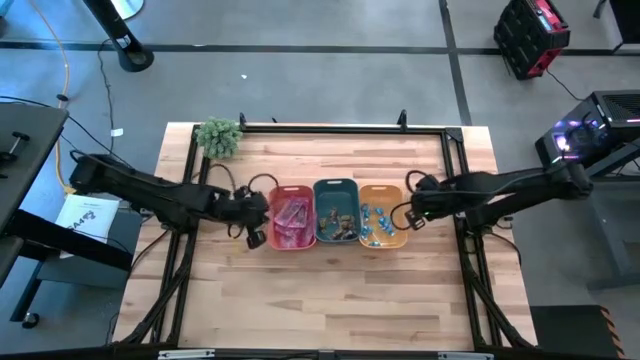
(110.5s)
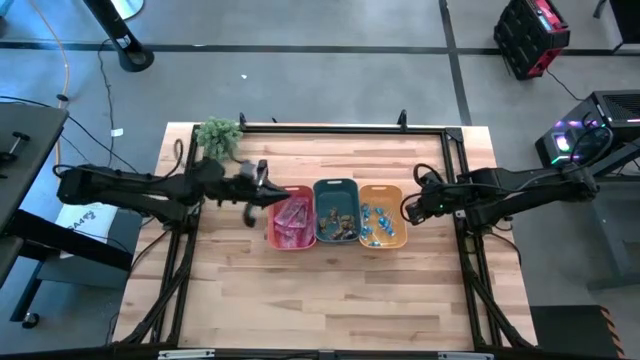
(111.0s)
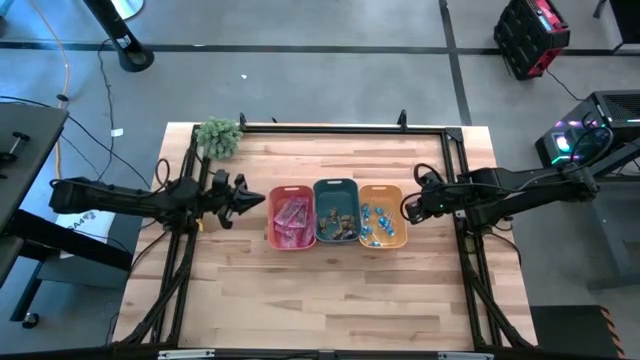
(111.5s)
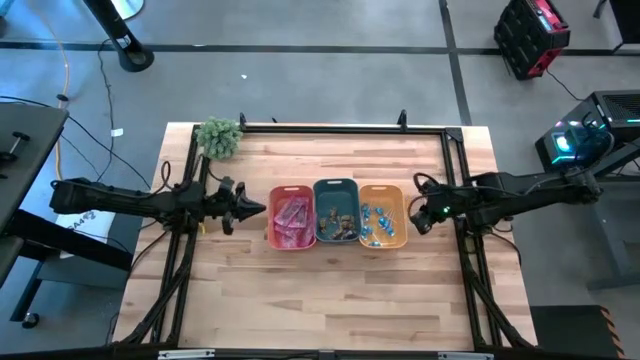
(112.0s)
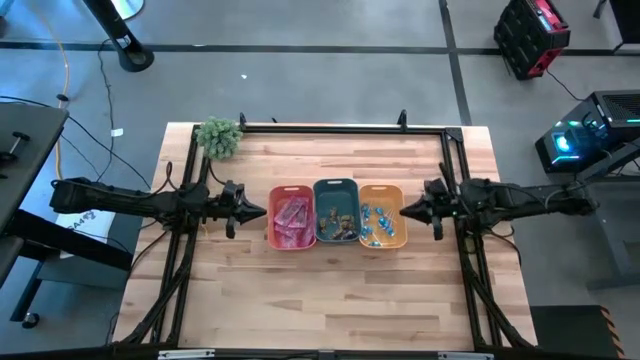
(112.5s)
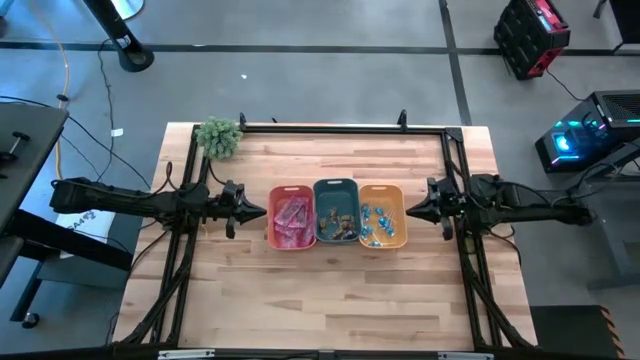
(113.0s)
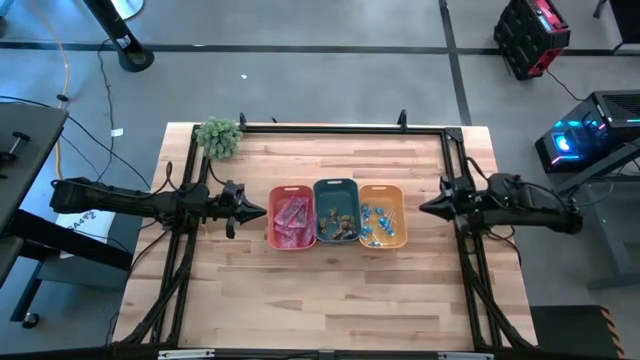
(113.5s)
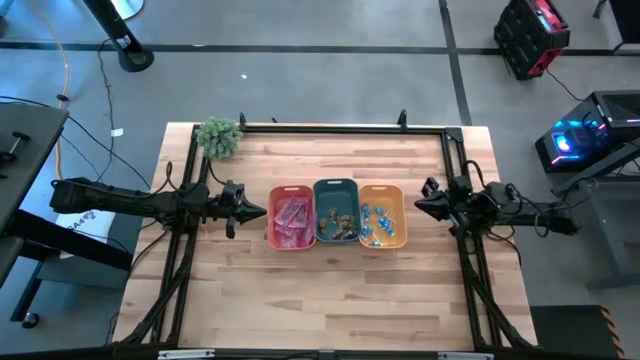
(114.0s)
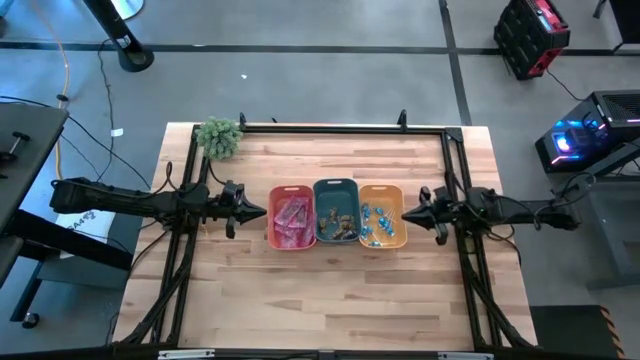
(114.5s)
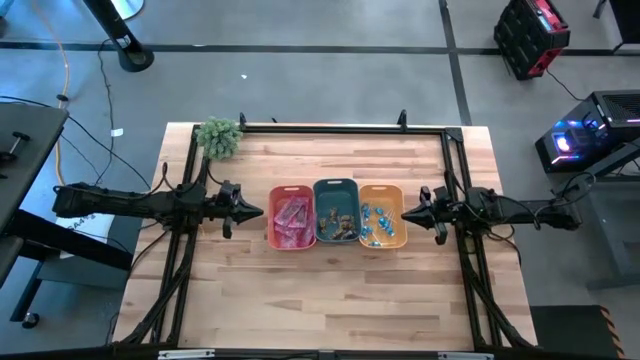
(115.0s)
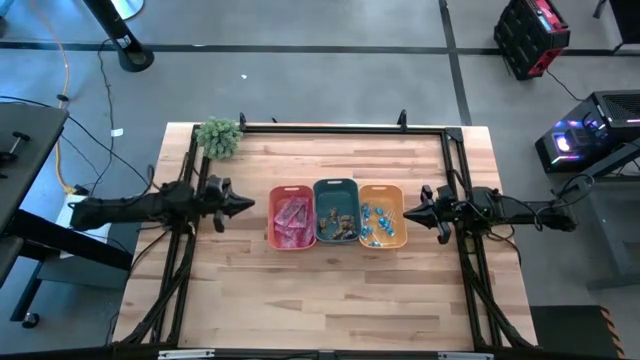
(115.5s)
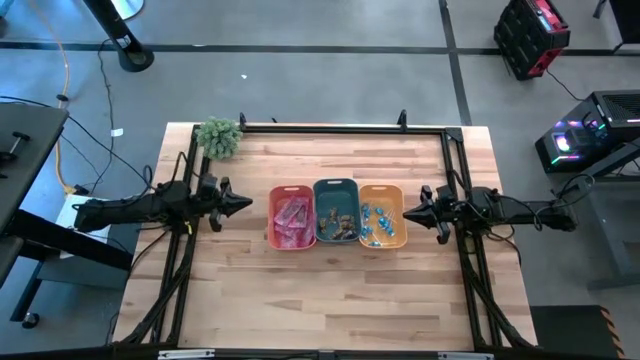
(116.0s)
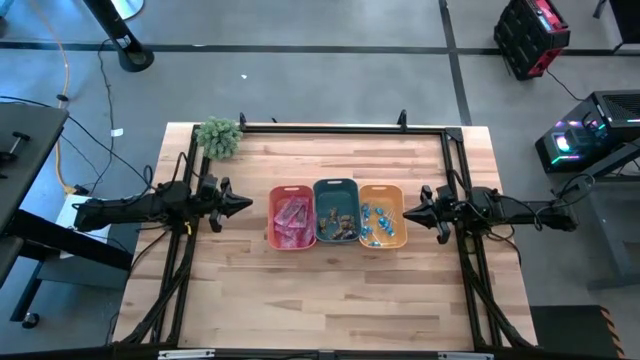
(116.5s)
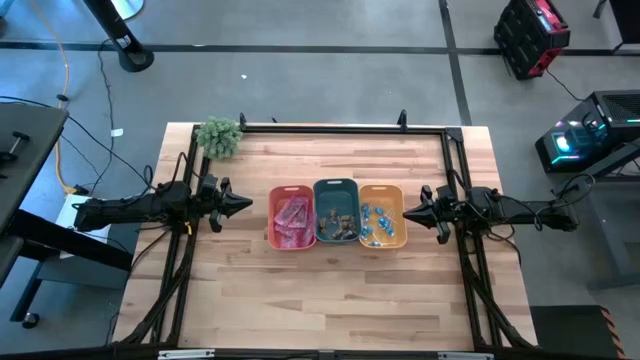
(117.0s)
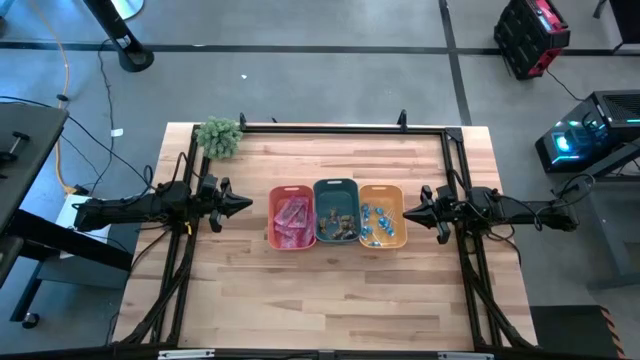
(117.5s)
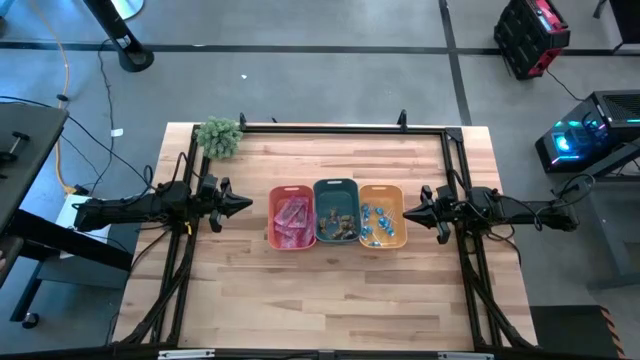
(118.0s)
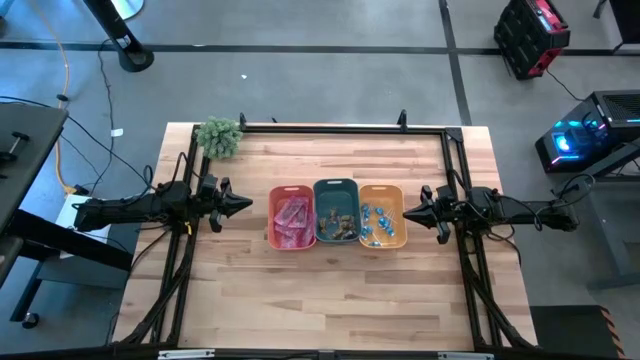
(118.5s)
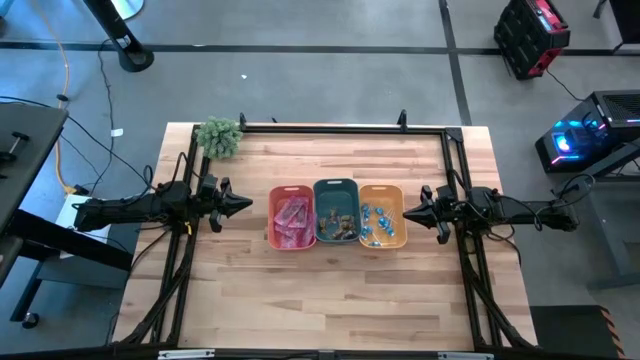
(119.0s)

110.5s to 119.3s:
Task: Sort candy
Return to Home Position
